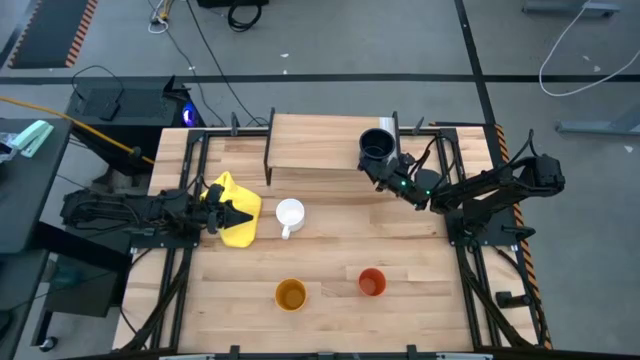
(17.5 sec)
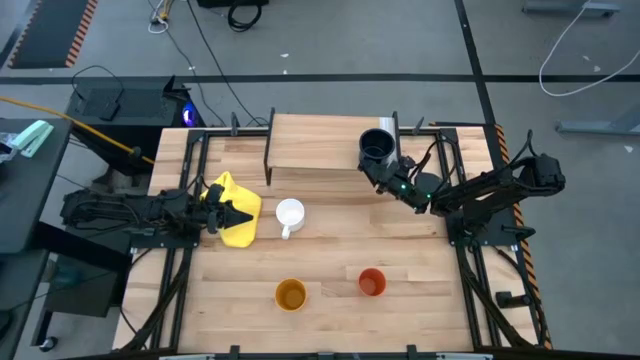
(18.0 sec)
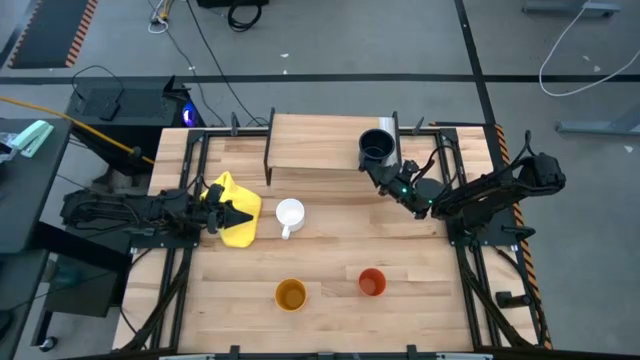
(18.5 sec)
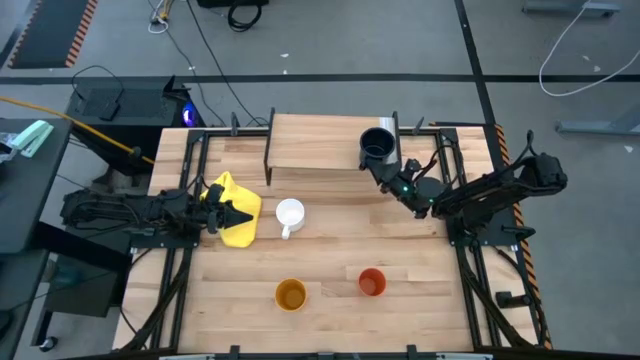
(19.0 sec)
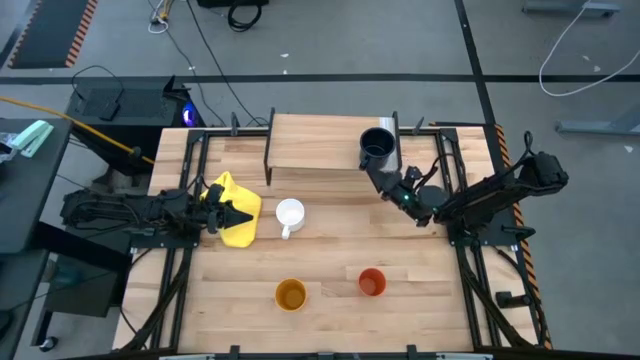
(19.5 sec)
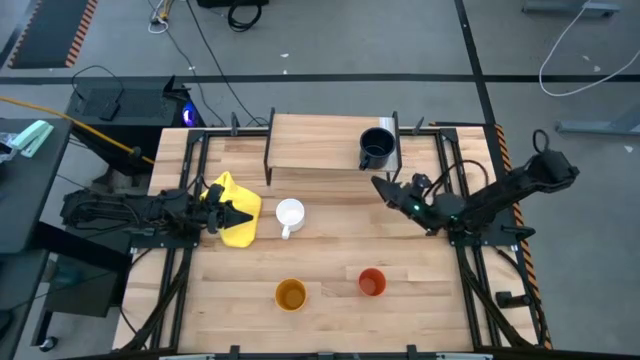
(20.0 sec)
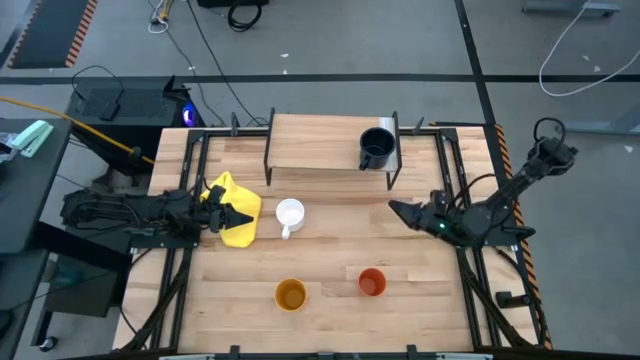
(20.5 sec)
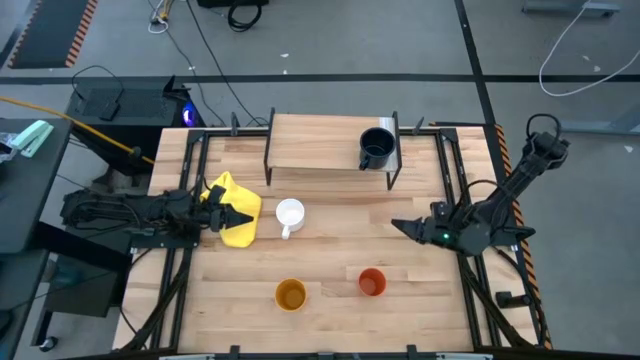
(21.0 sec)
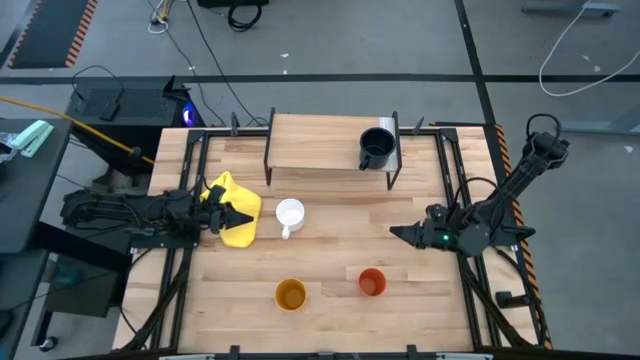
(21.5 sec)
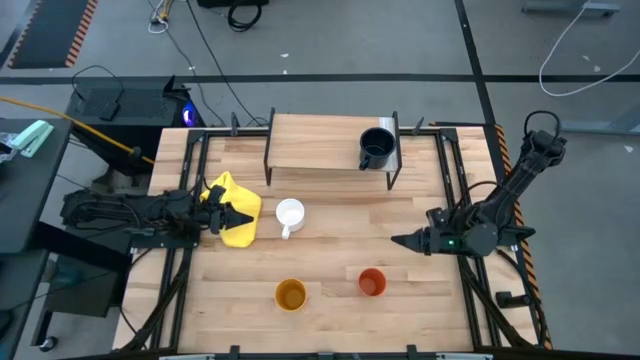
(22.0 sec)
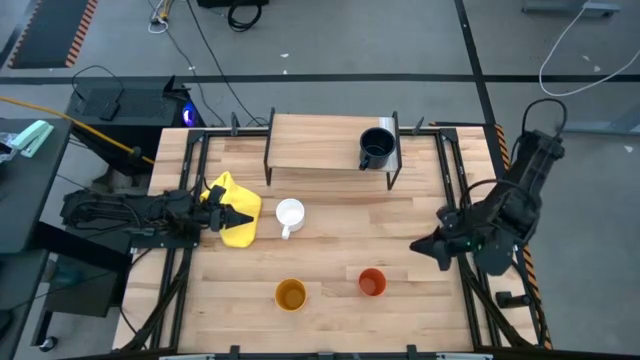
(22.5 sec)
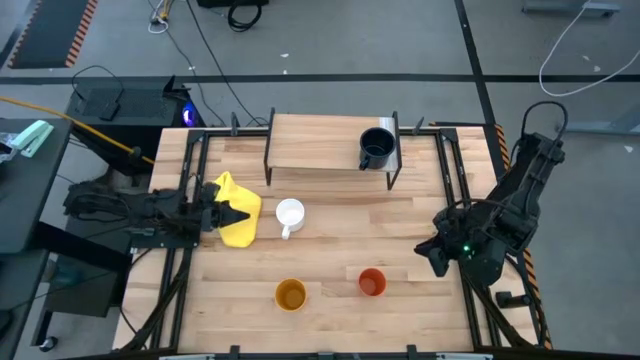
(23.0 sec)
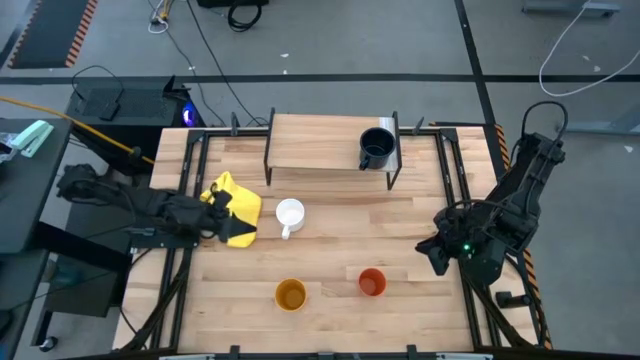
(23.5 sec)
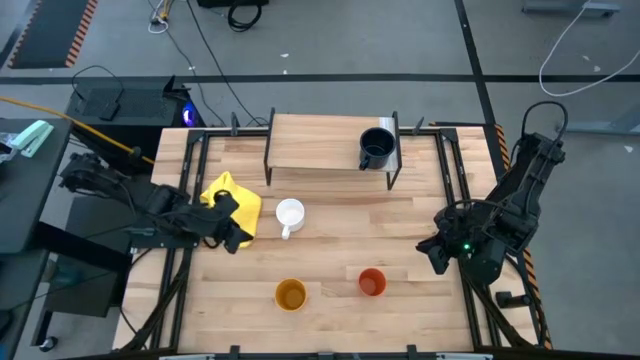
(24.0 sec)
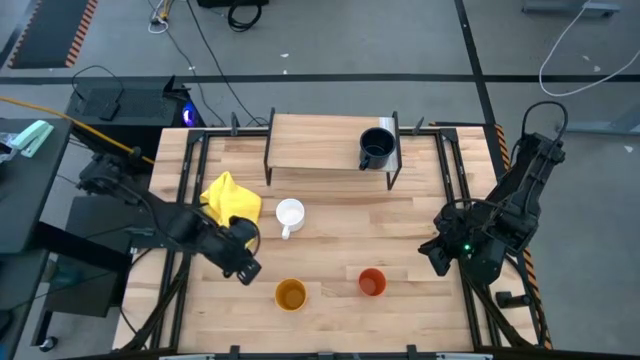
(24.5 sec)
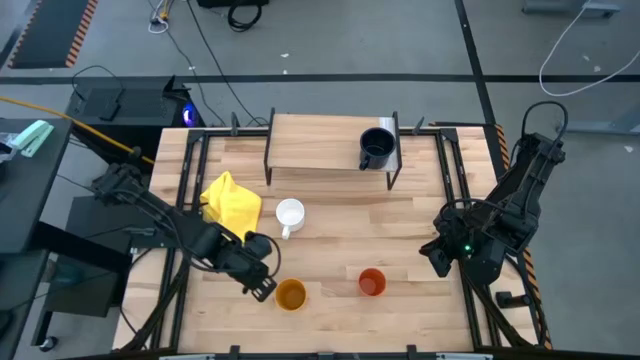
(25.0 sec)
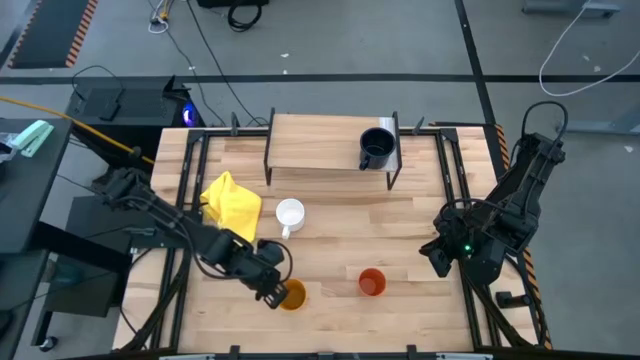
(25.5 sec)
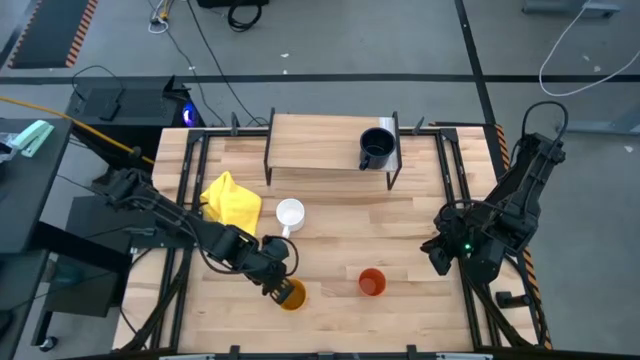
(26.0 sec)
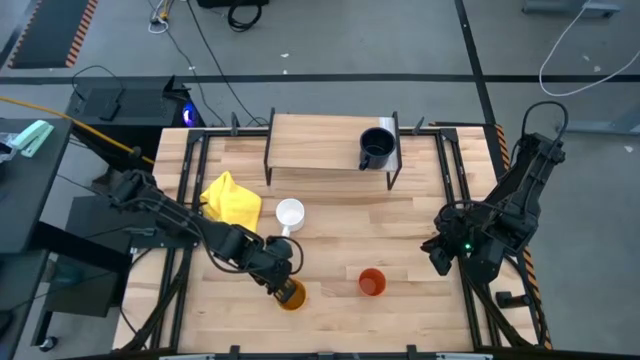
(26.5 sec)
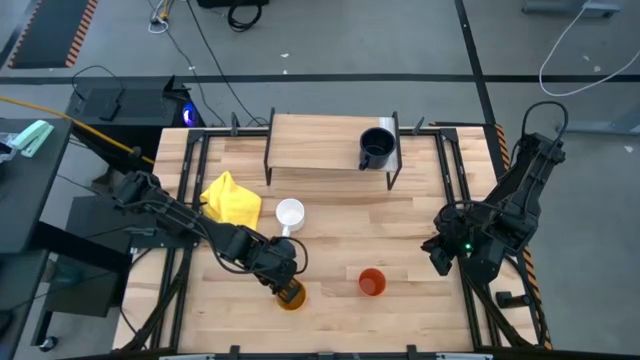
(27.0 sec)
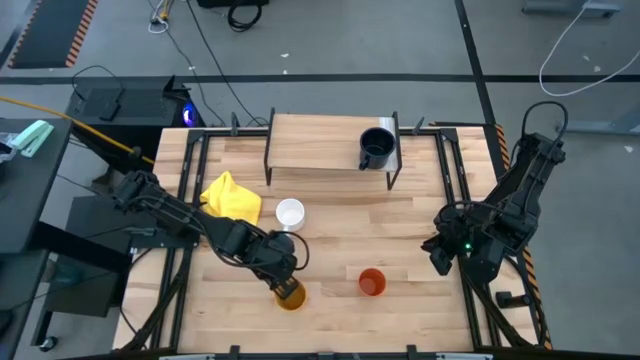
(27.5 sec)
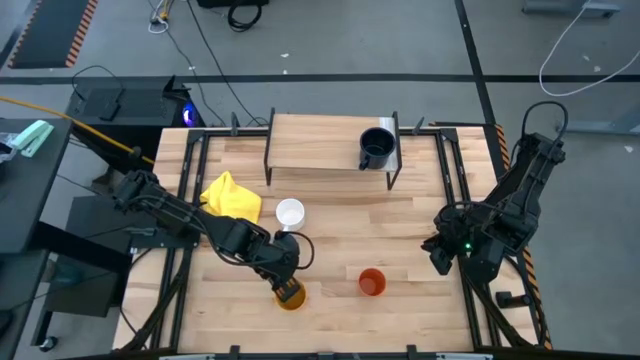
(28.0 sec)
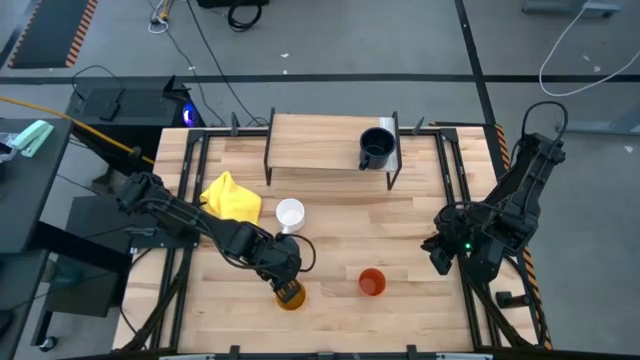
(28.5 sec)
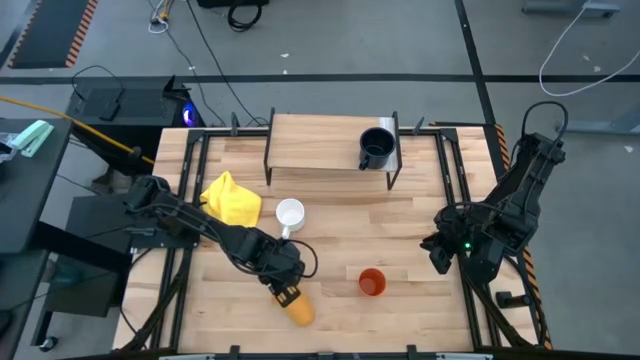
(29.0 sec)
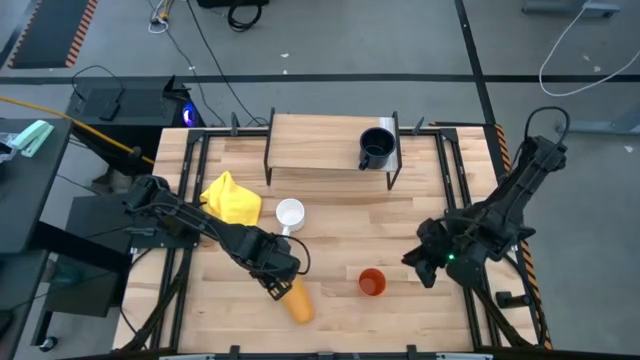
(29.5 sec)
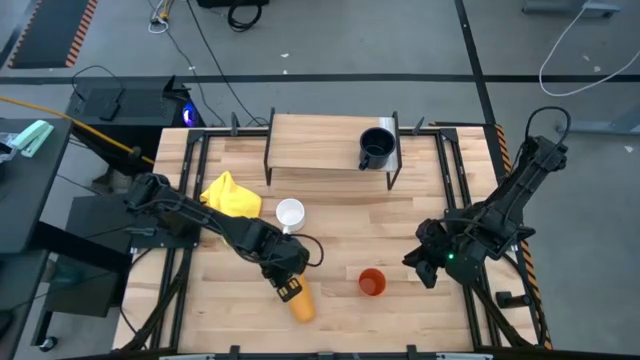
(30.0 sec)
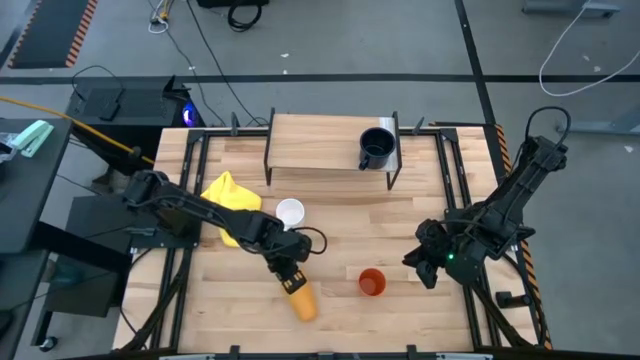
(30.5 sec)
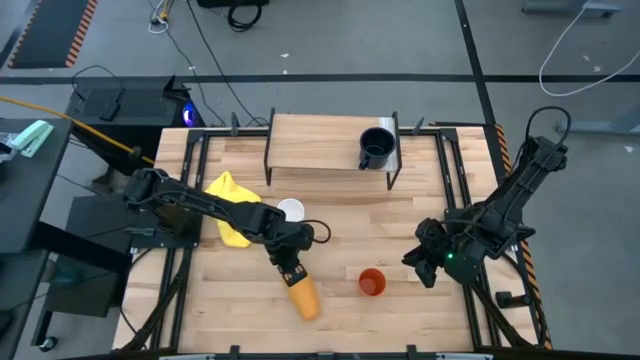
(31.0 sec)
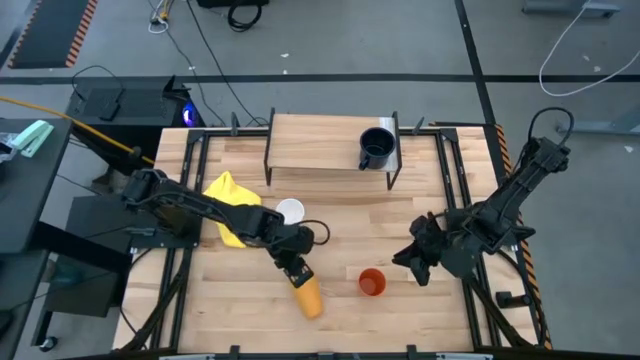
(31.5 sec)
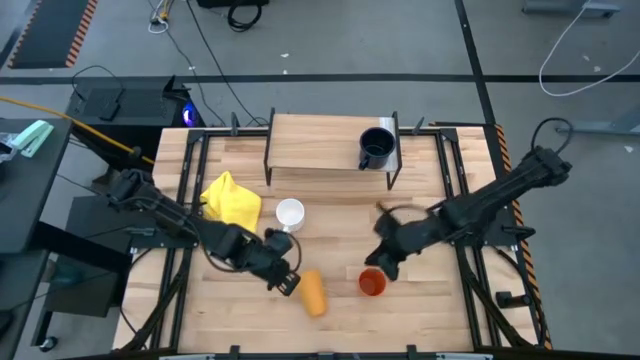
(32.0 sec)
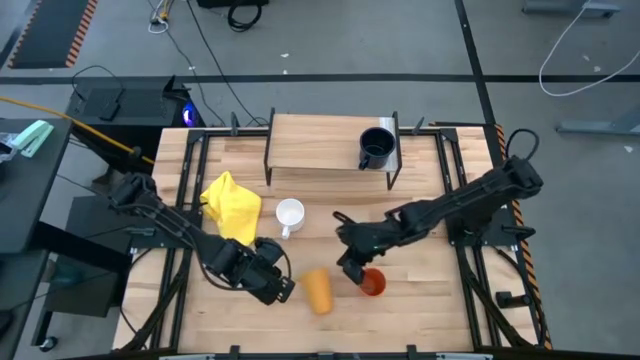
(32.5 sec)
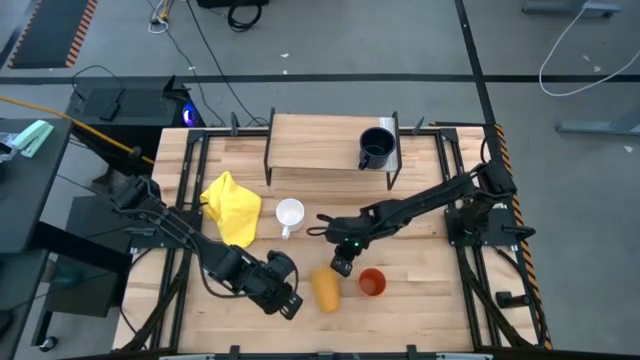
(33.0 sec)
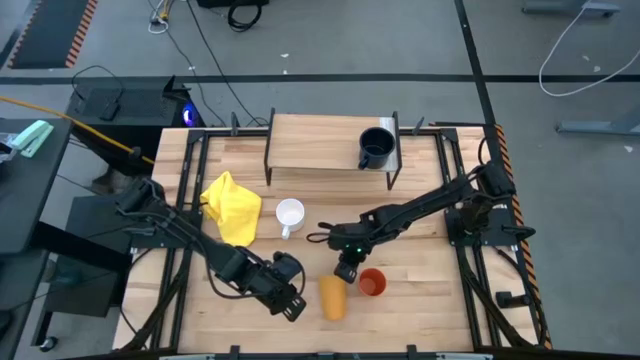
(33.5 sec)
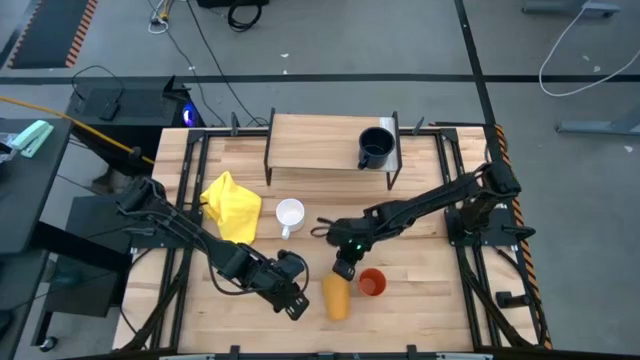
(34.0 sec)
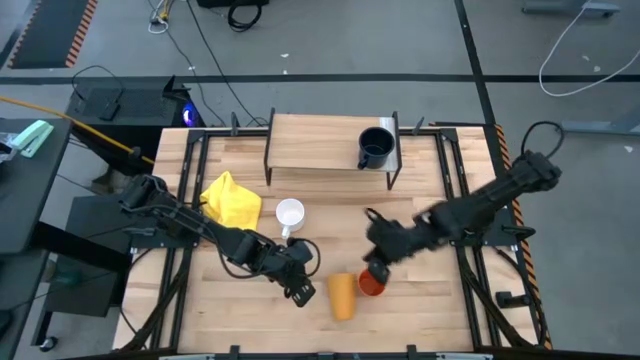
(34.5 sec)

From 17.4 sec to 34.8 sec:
Task: Stack small to large cups/mugs on shelf
Put the yellow cup on the shelf

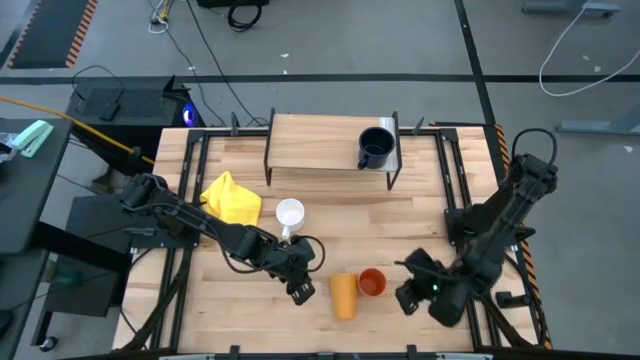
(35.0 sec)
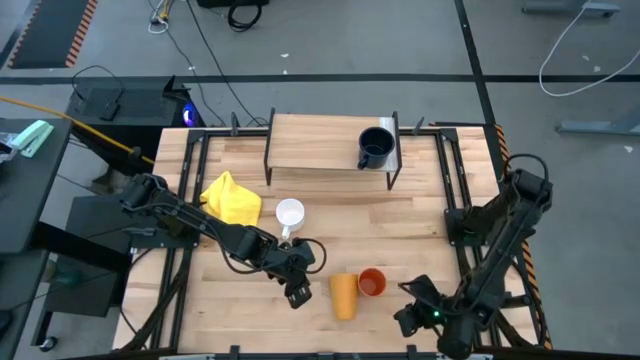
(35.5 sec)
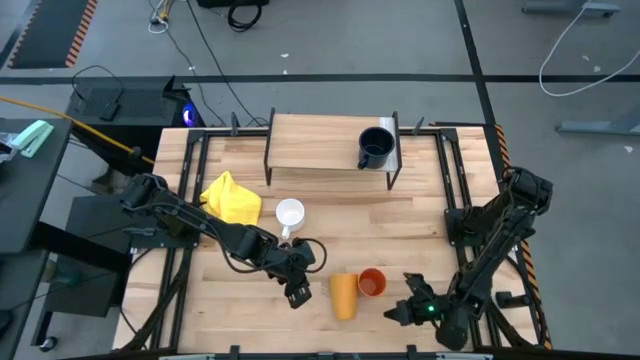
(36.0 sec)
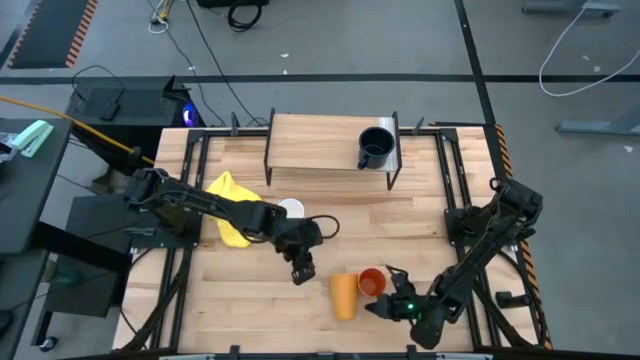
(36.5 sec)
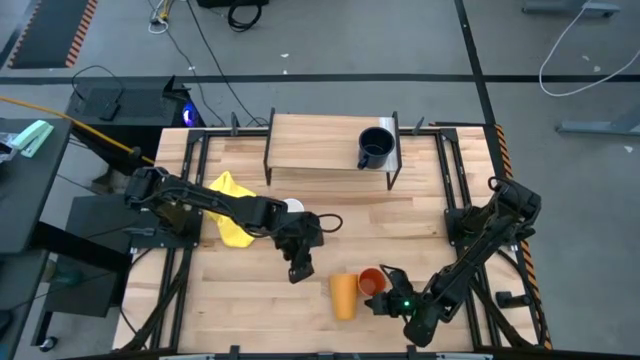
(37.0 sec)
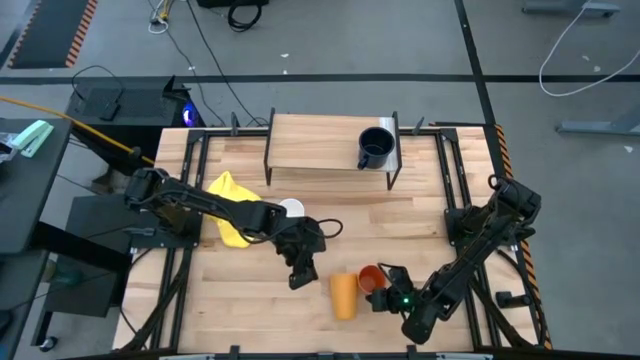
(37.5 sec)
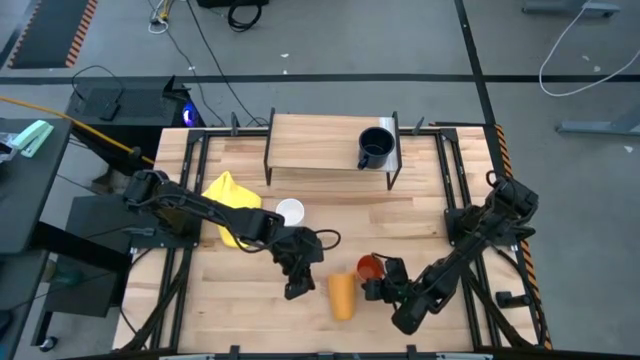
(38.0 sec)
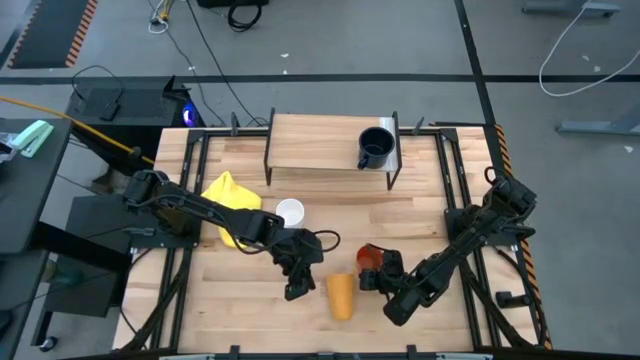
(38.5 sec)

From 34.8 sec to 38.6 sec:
Move the orange cup to the table
